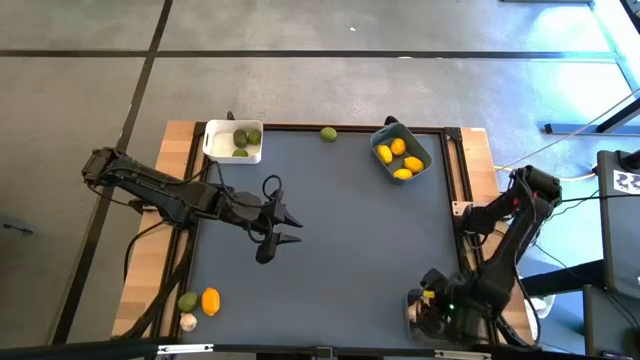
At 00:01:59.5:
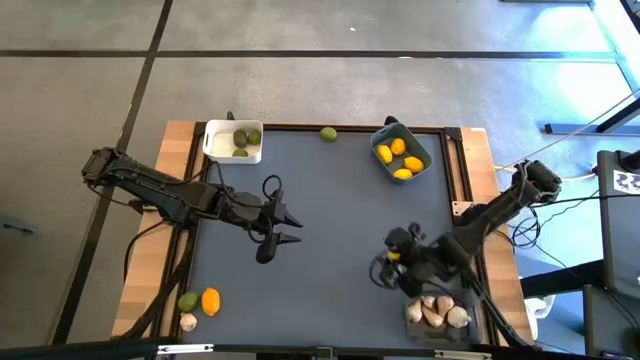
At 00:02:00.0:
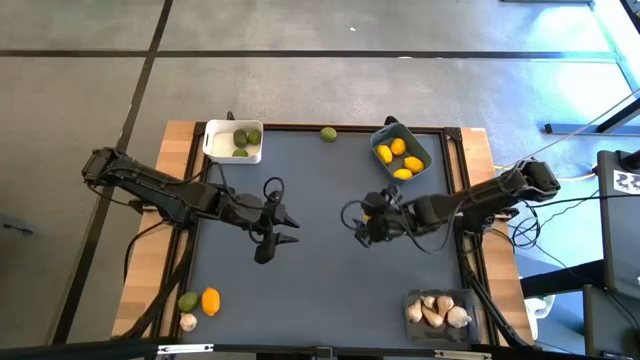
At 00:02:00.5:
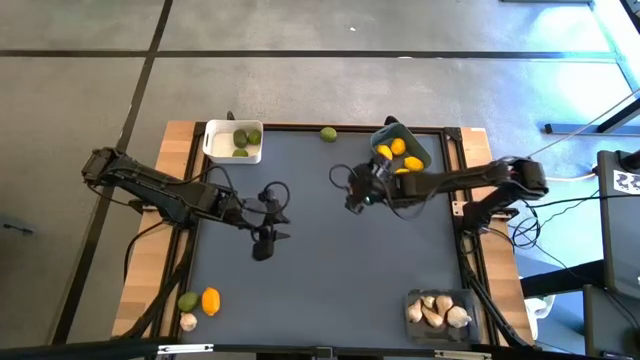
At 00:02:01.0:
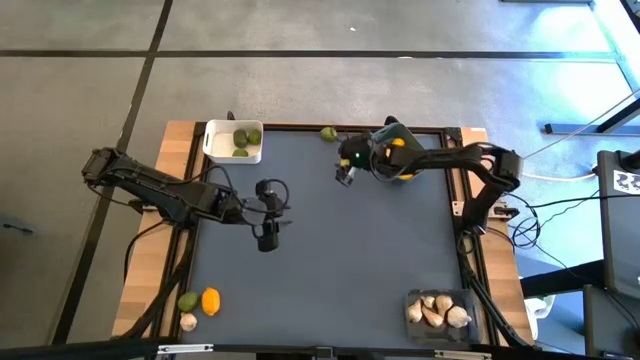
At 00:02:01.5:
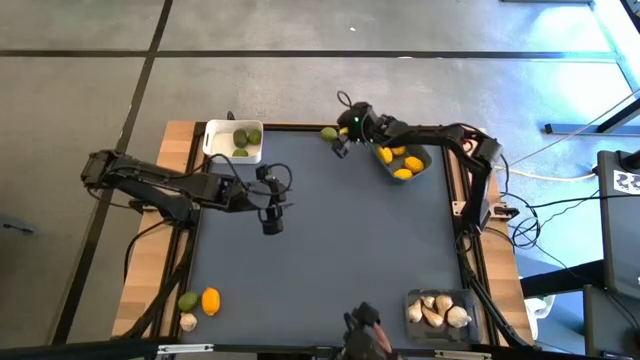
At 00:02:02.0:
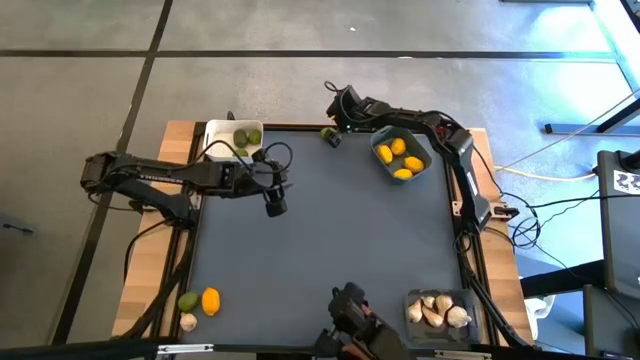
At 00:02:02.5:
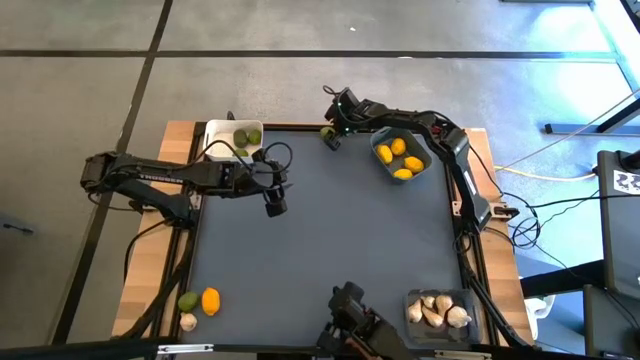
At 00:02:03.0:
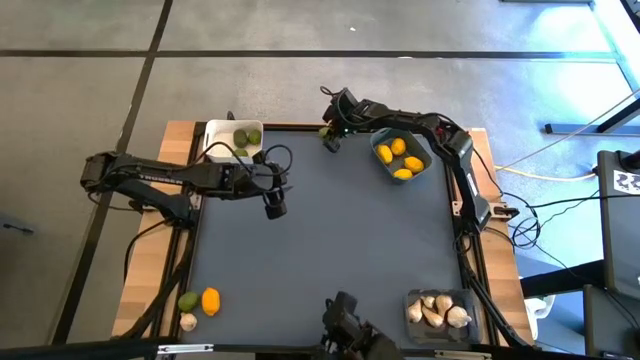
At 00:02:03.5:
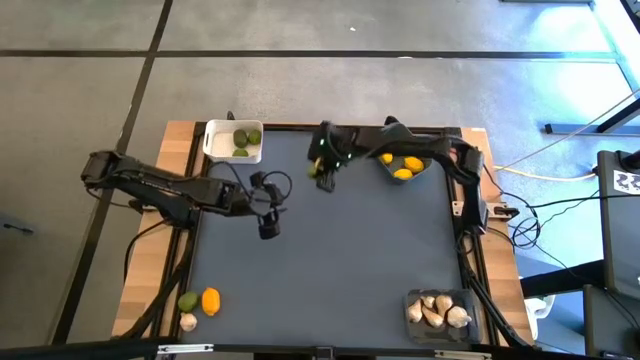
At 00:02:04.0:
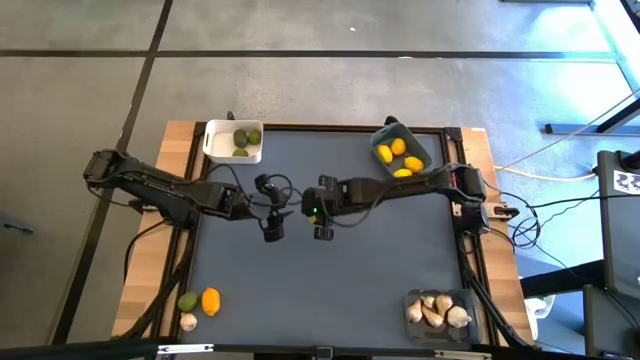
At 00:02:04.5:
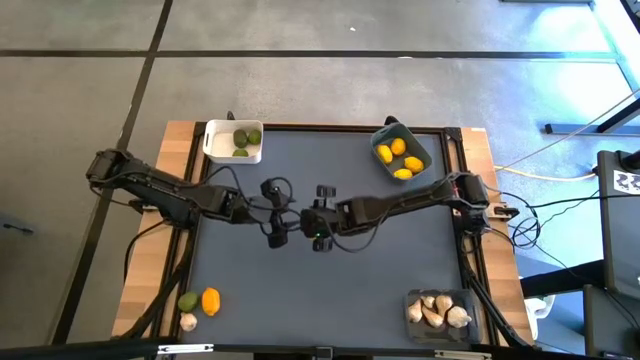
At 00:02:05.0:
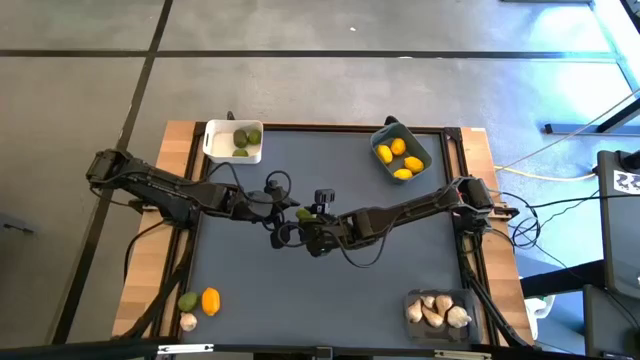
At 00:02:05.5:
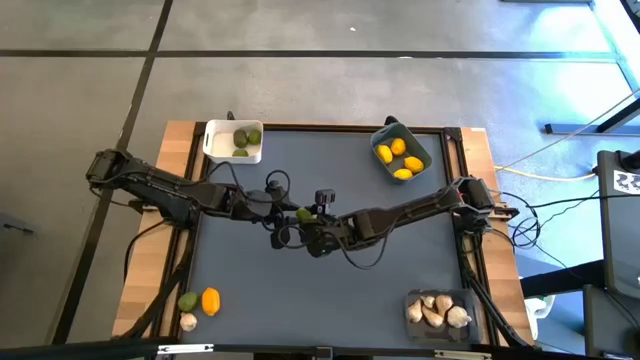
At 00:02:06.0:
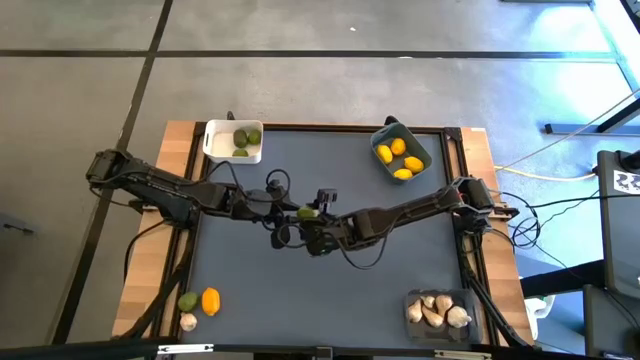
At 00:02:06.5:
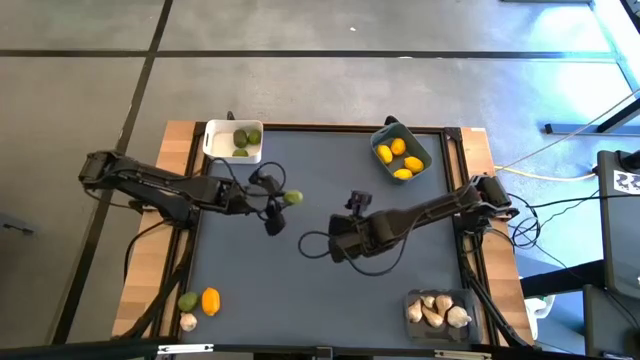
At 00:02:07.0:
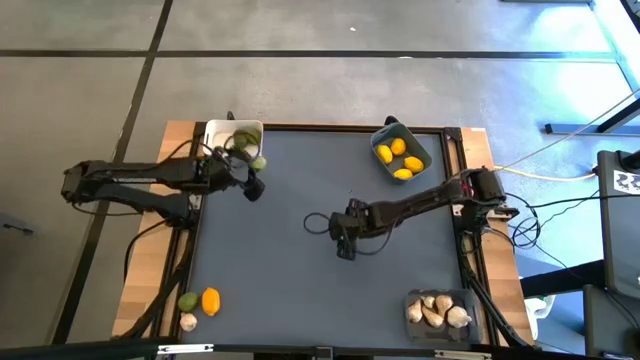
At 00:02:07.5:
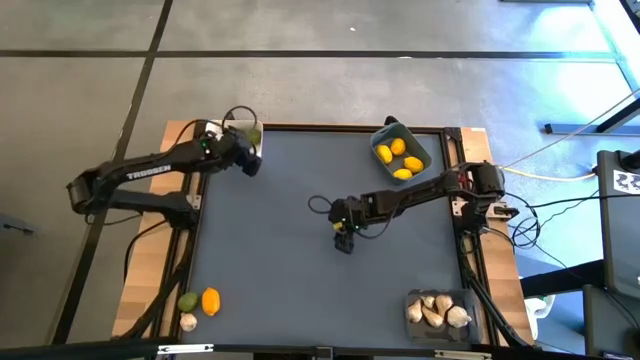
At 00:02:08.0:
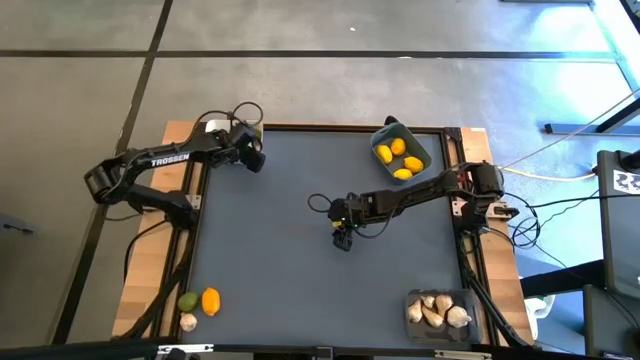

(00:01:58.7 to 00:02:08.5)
Task: Sort produce into baskets
Put the lime into the white bin

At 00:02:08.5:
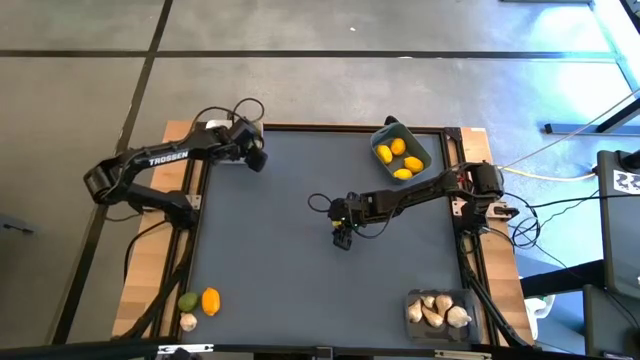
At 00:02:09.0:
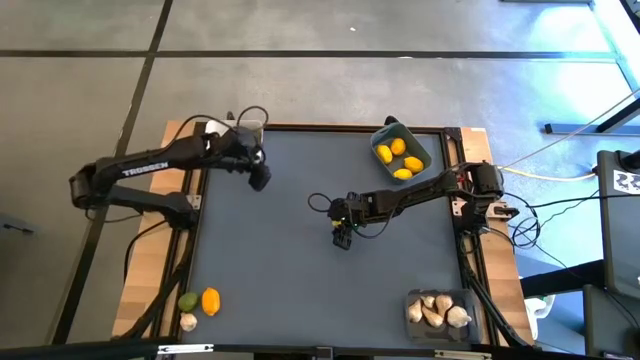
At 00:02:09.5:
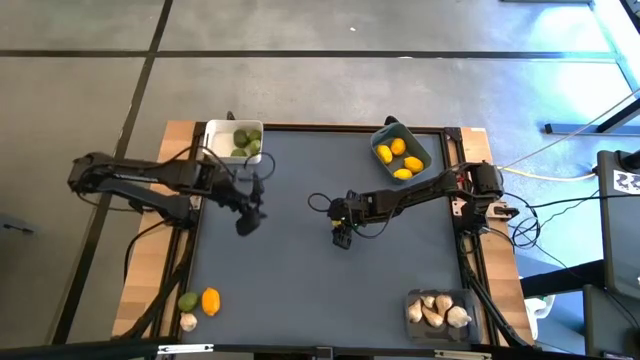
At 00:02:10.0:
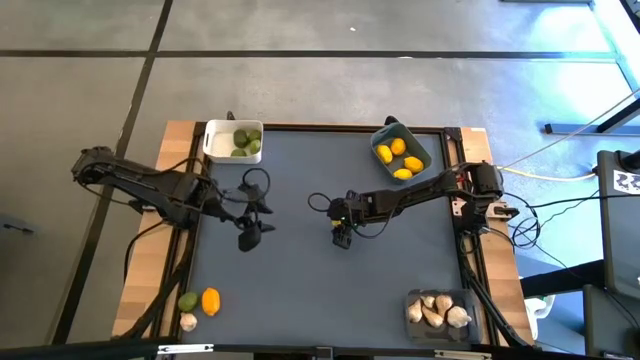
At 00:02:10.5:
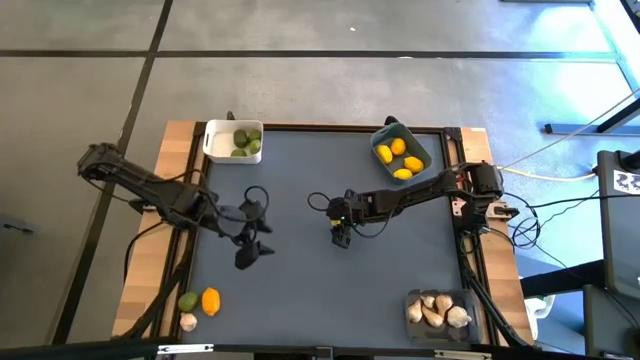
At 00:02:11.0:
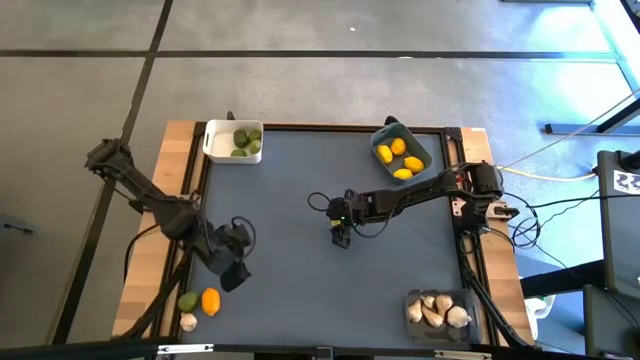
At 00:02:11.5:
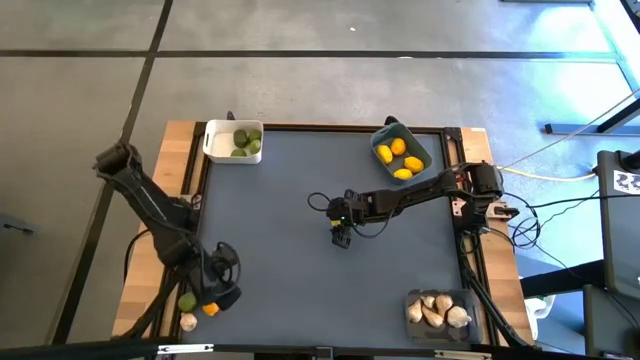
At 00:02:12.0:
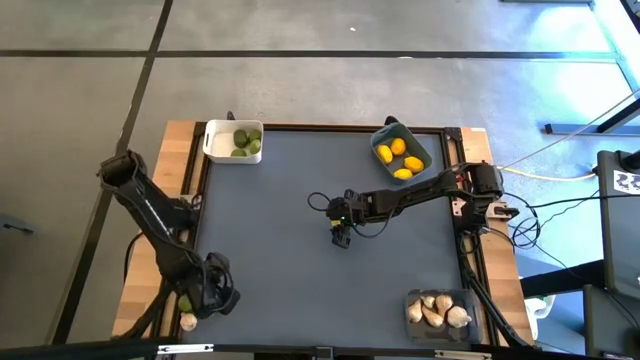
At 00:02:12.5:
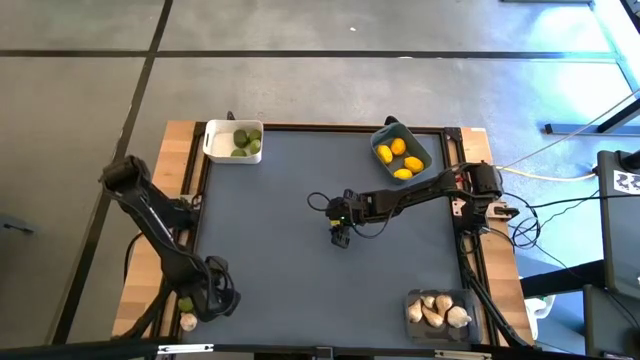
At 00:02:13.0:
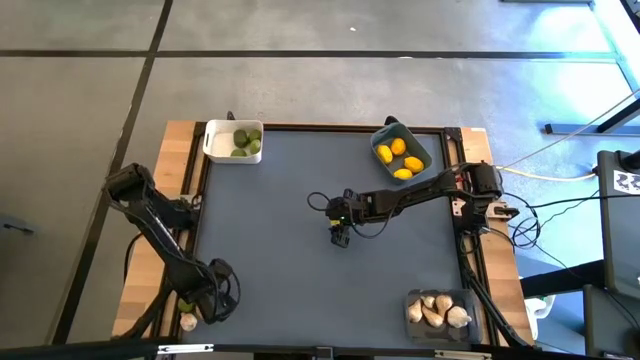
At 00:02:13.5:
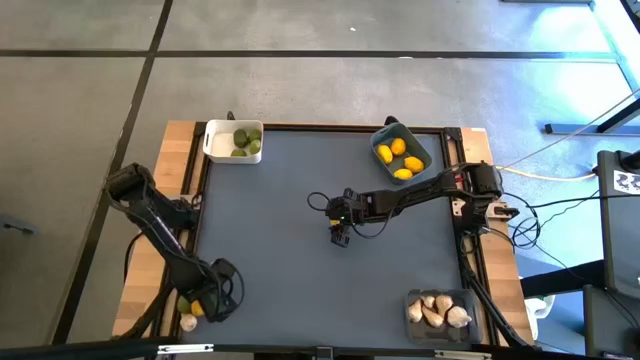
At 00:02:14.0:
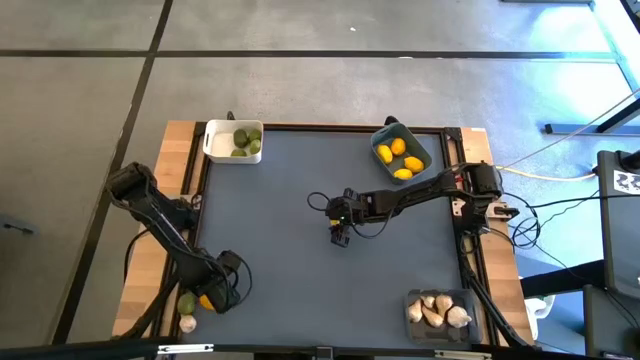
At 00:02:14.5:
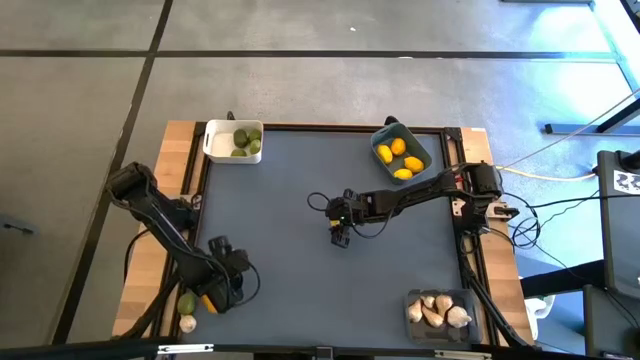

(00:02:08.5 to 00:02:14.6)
Put the lemon into the blue bin

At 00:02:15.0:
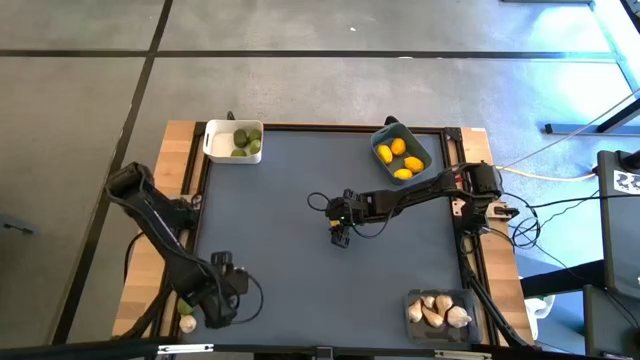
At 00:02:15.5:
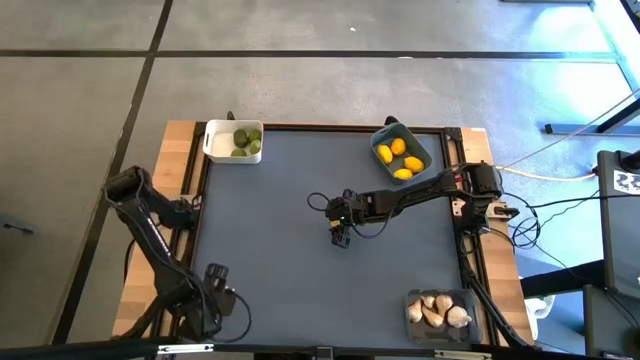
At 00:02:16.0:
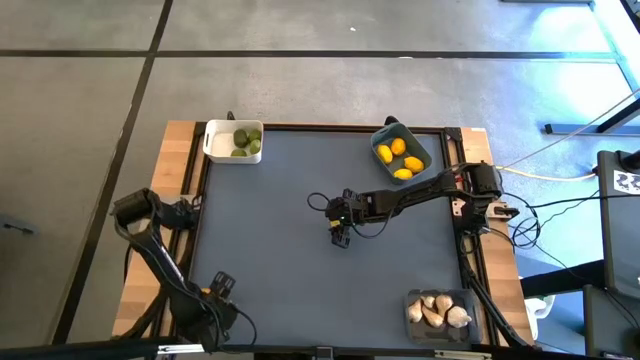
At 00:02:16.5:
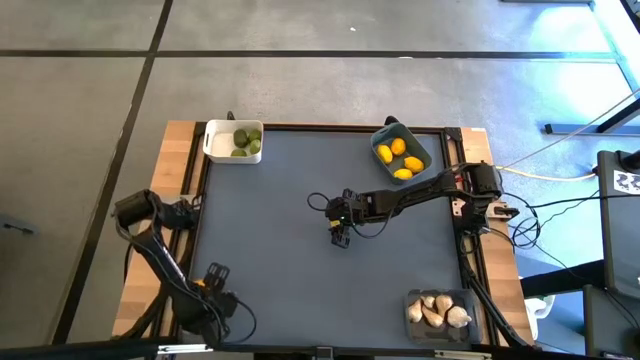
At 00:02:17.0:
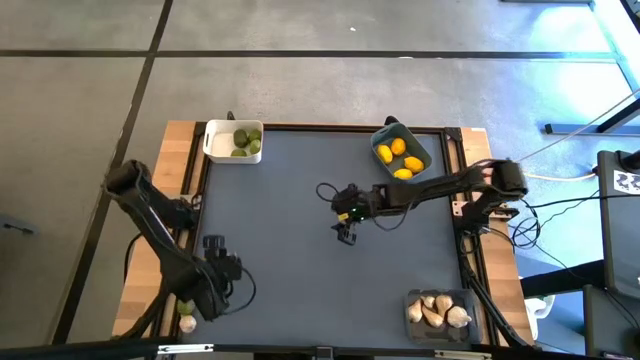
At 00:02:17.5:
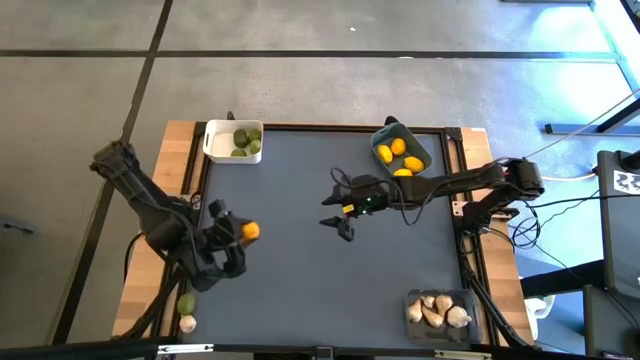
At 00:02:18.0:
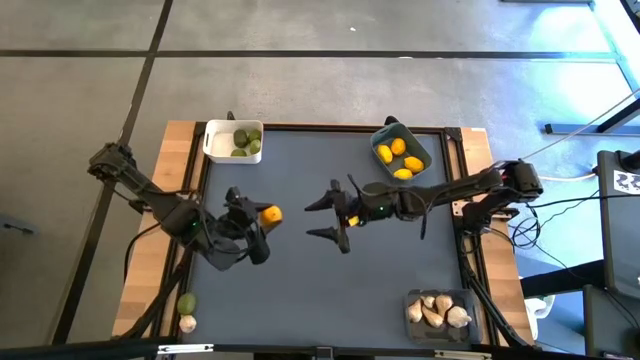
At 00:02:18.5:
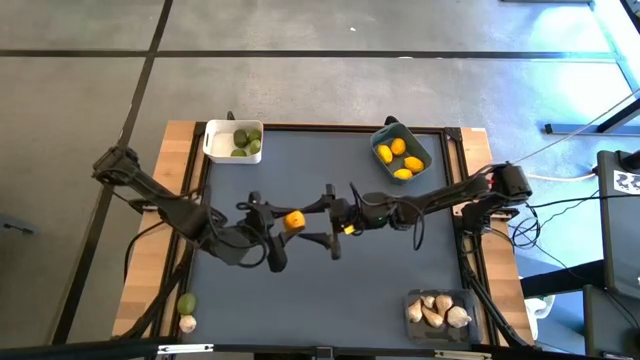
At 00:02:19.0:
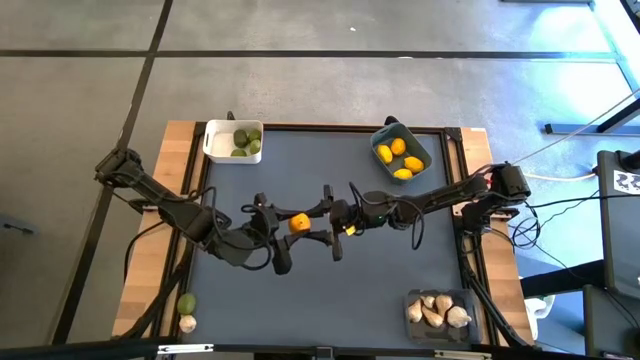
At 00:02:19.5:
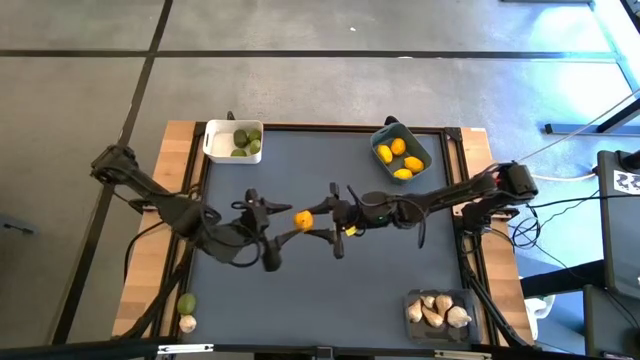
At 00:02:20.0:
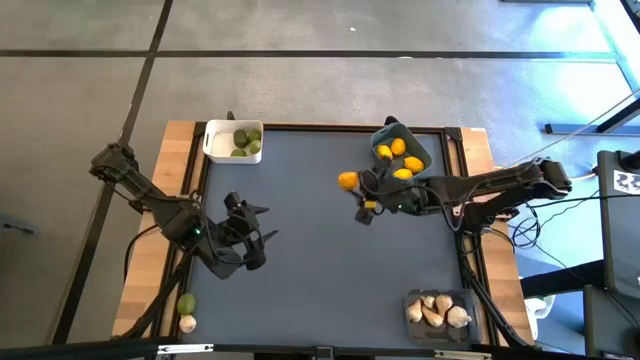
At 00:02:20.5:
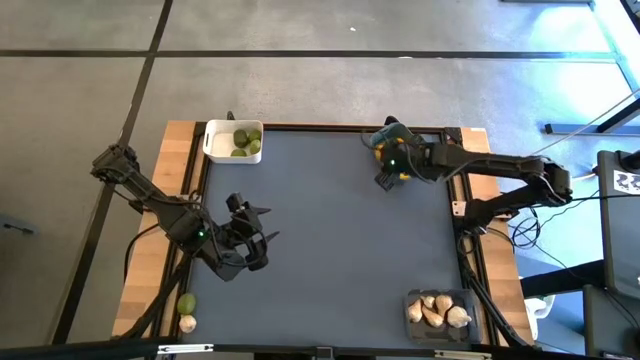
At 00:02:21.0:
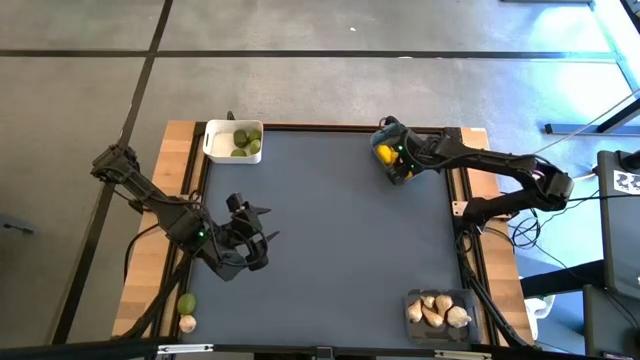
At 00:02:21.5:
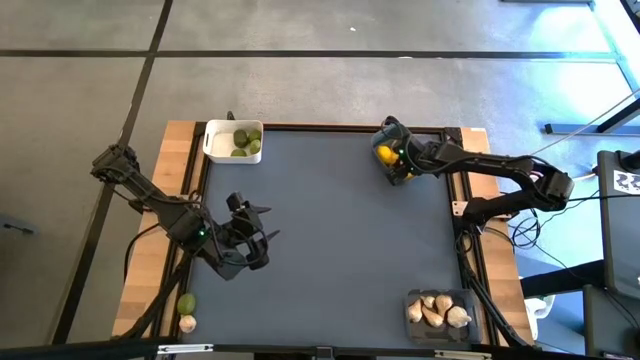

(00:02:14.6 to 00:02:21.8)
Put the lemon into the blue bin
